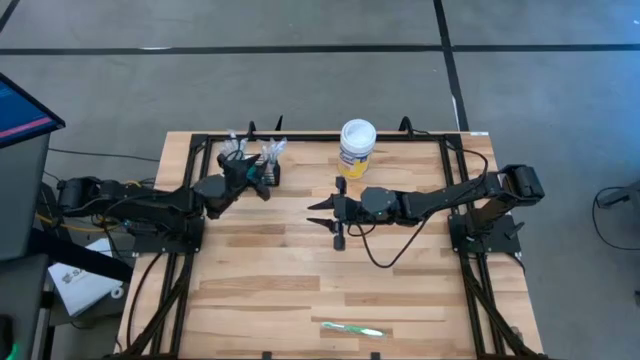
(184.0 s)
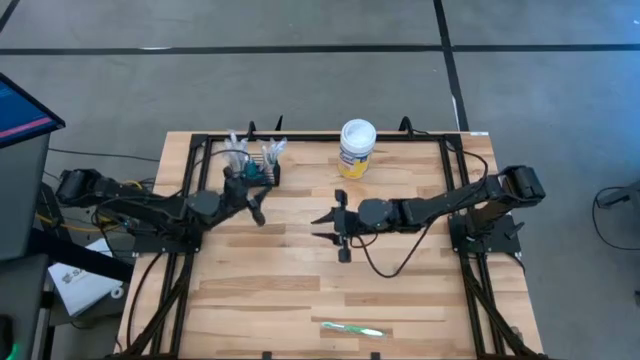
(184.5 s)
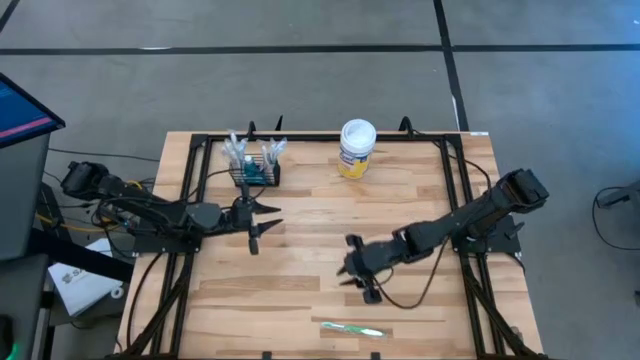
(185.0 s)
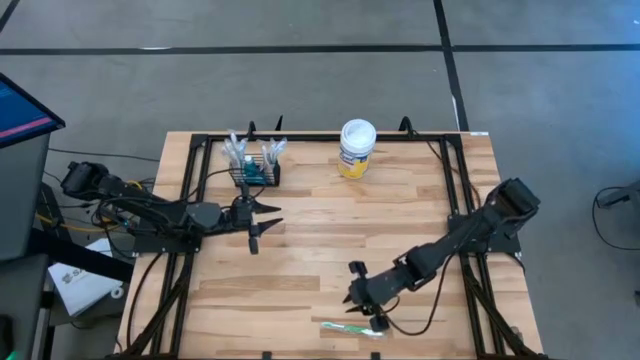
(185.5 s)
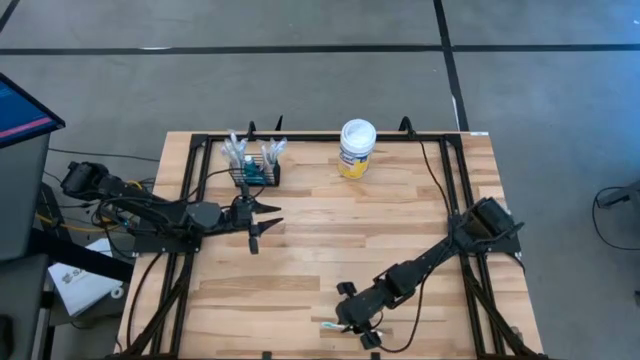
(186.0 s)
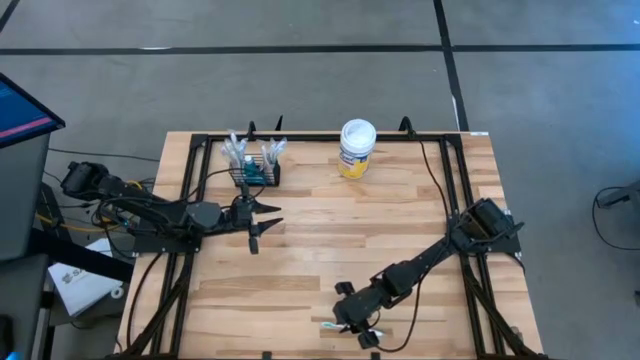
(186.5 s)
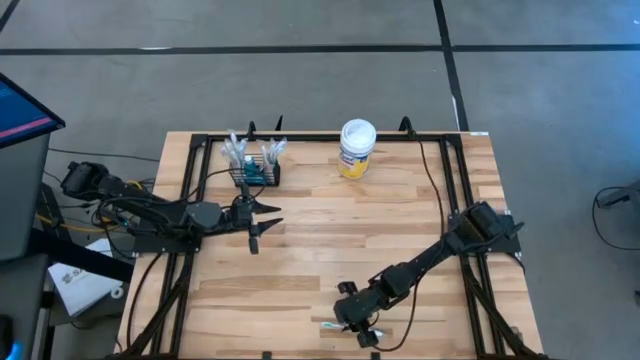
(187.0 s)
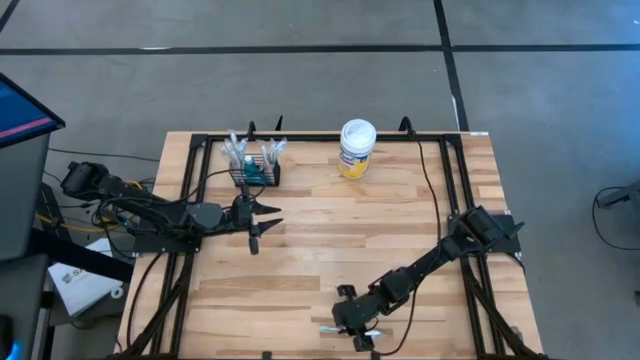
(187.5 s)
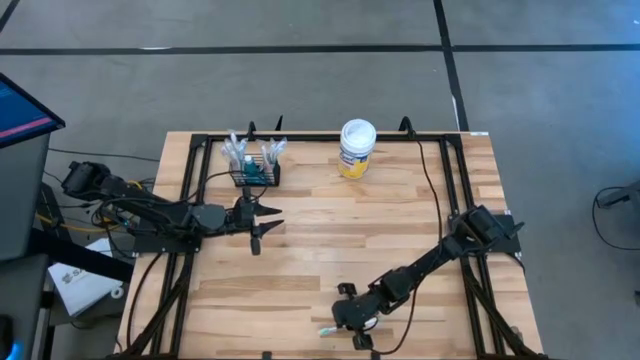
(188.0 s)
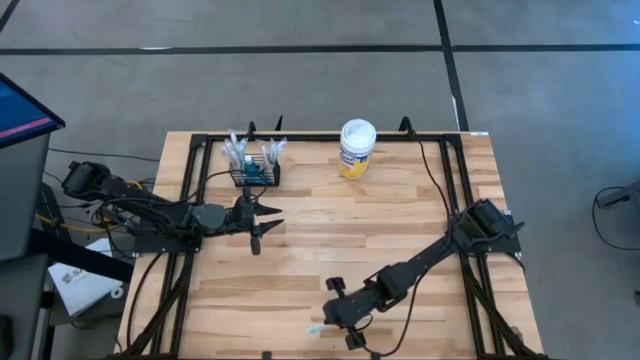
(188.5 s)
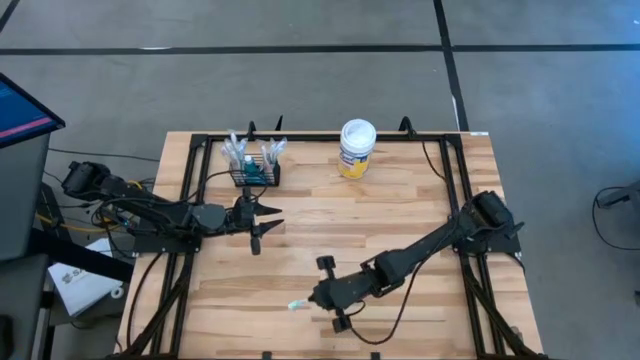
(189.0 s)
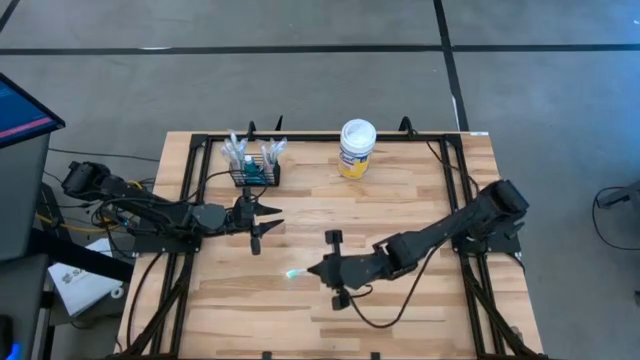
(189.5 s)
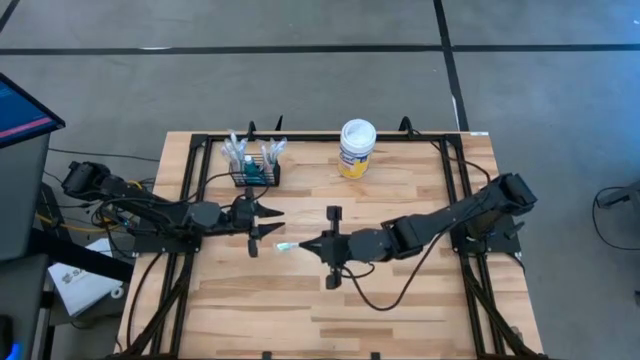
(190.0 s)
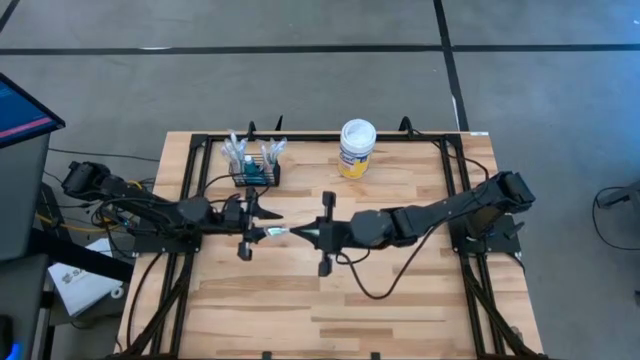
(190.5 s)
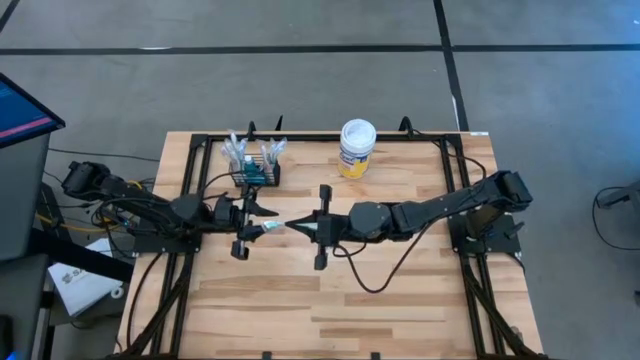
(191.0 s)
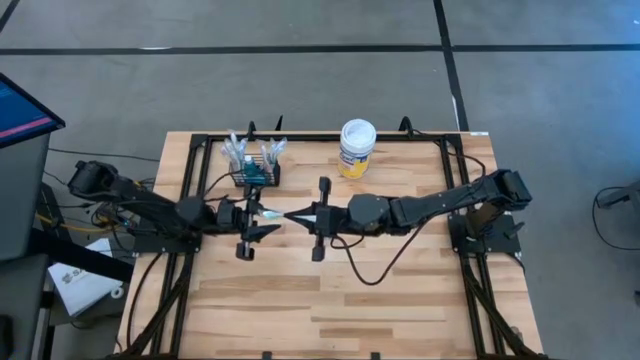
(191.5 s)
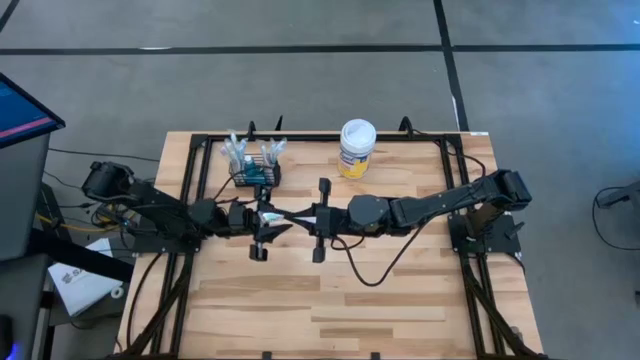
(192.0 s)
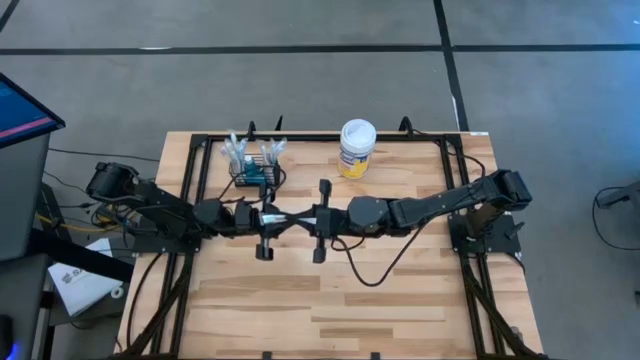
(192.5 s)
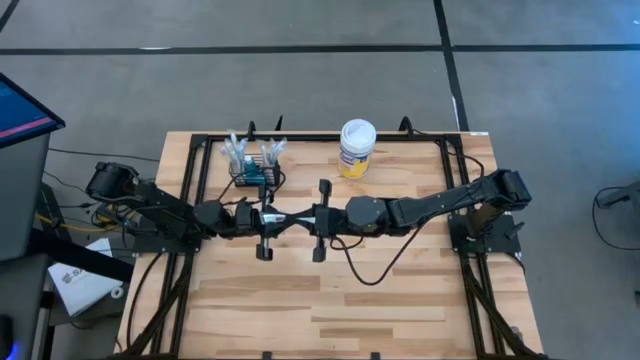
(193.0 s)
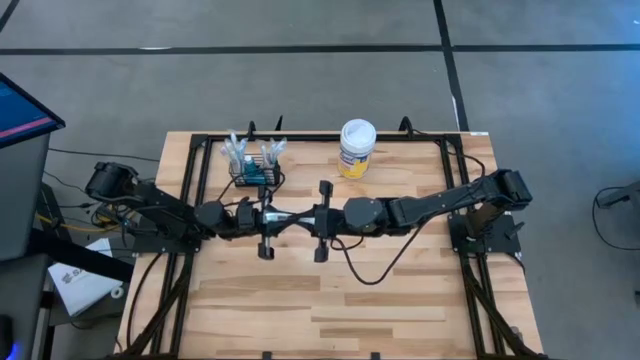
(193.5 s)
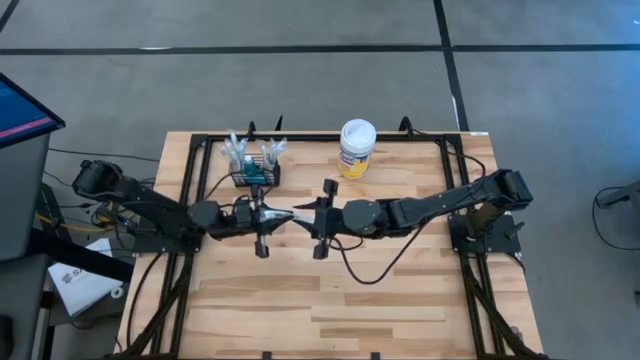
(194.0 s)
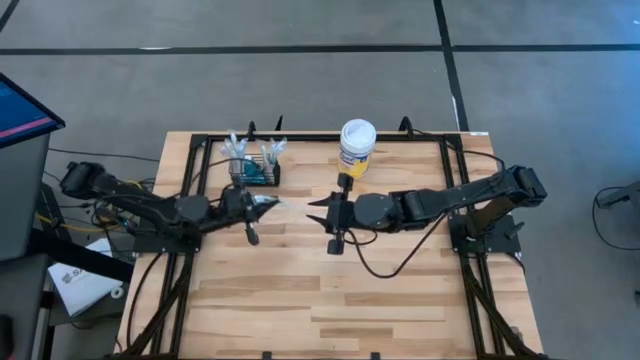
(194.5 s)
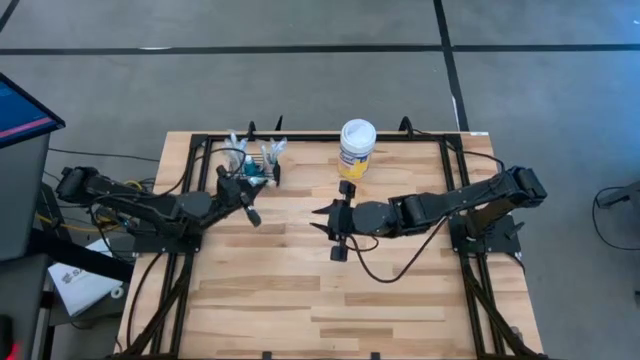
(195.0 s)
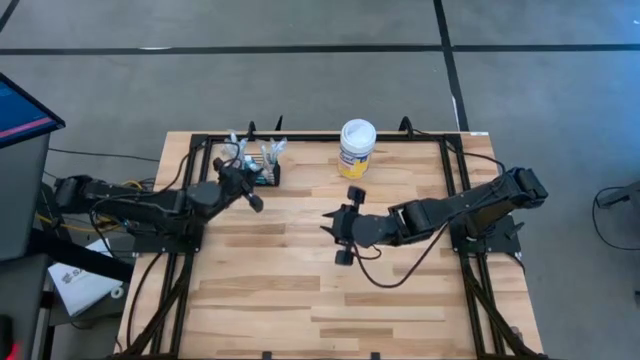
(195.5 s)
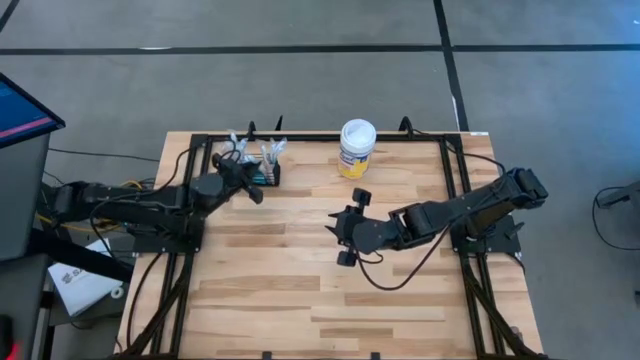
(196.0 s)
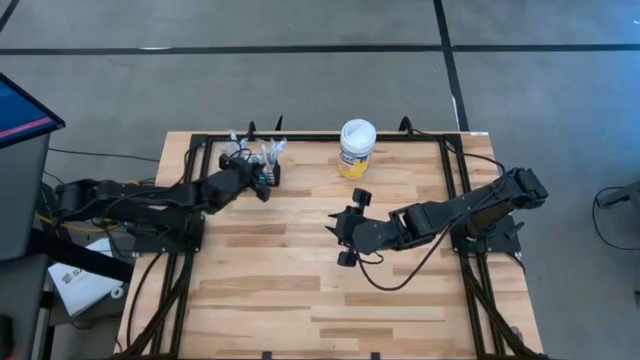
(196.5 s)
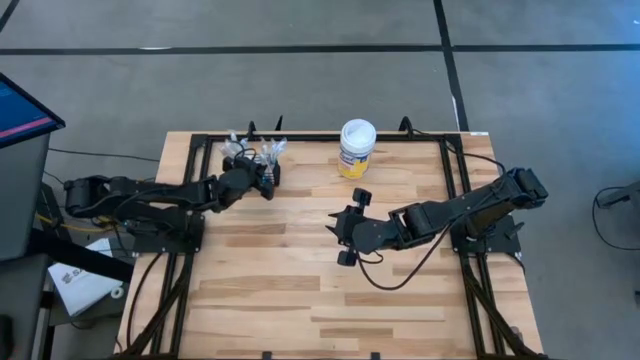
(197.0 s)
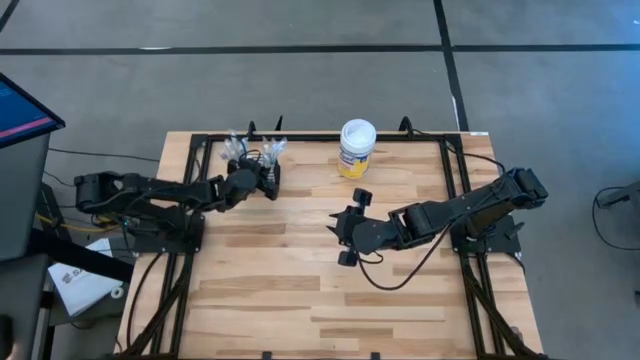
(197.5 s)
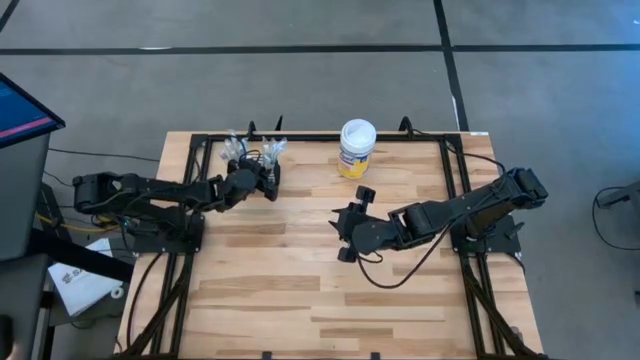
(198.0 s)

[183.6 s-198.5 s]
Task: Pick & Place toothbrushing station
Put the green toothbrush into the mesh organizer

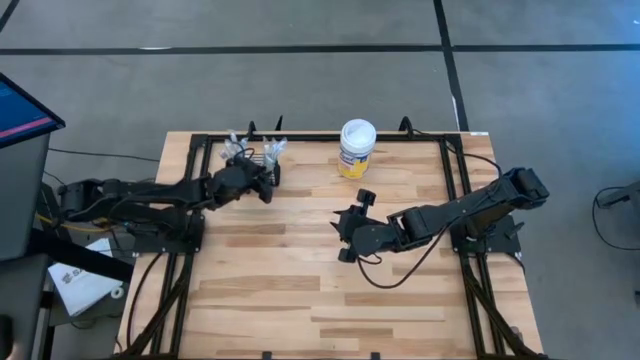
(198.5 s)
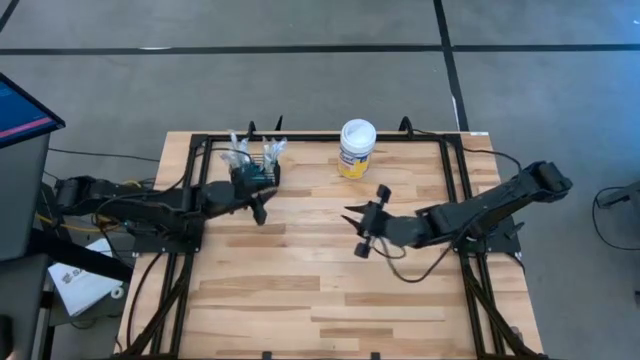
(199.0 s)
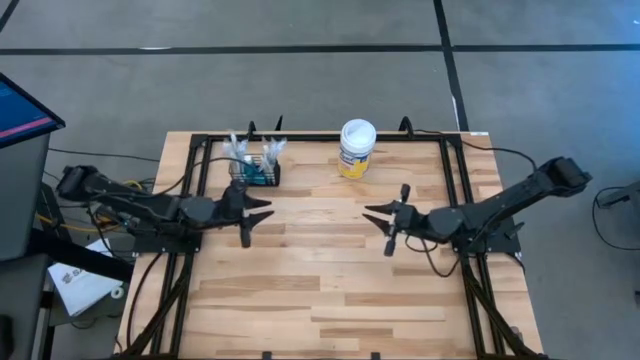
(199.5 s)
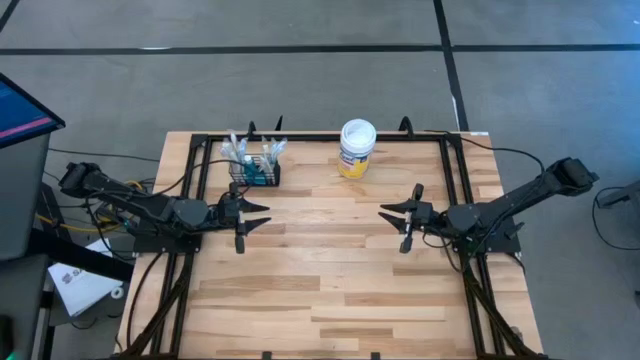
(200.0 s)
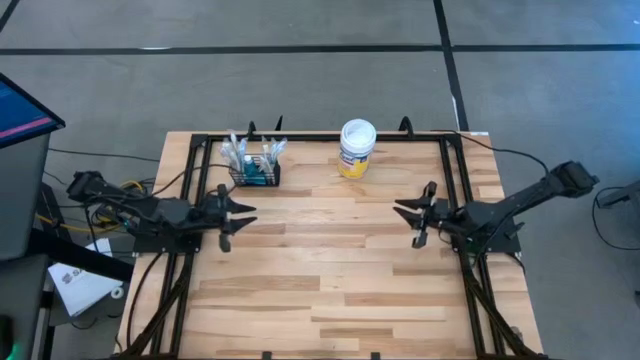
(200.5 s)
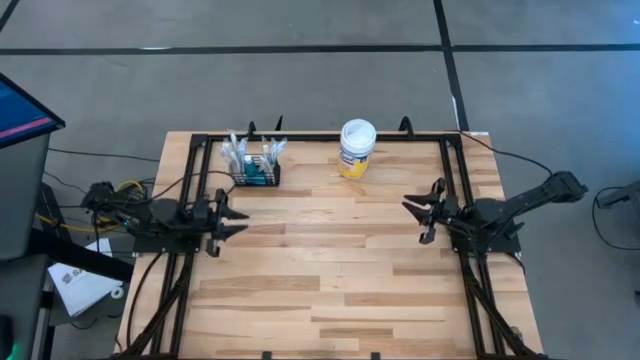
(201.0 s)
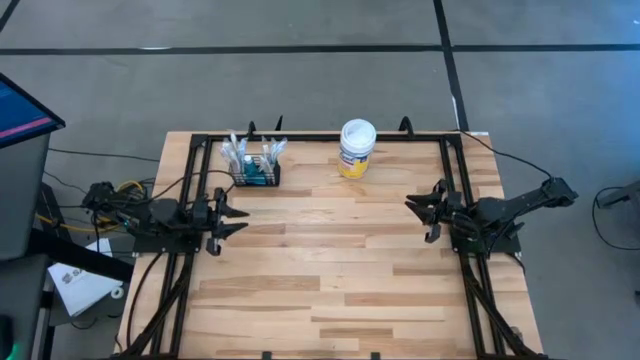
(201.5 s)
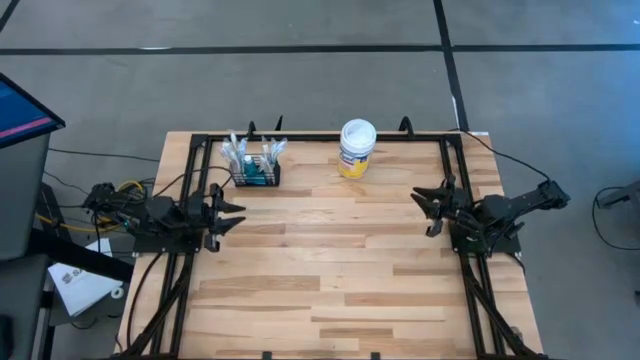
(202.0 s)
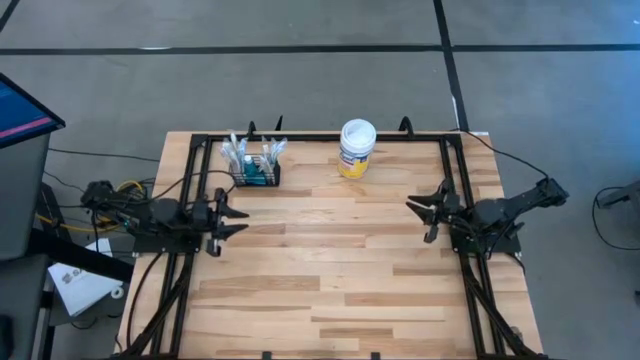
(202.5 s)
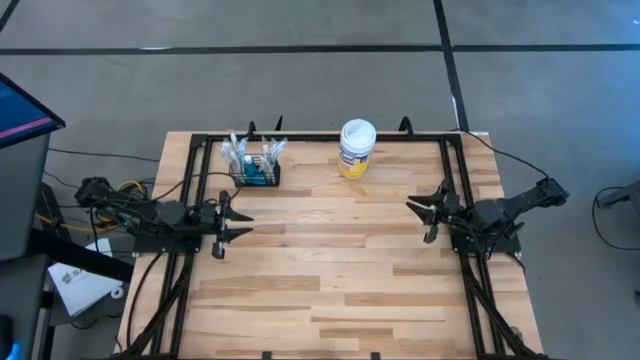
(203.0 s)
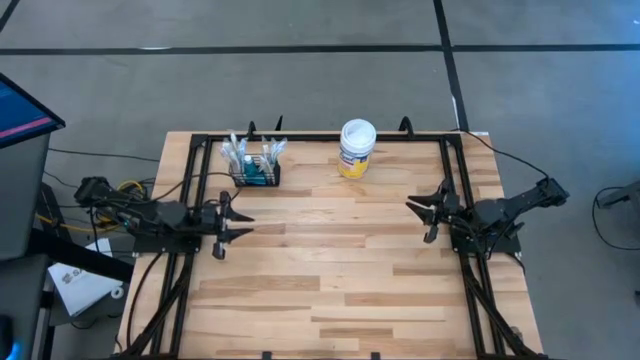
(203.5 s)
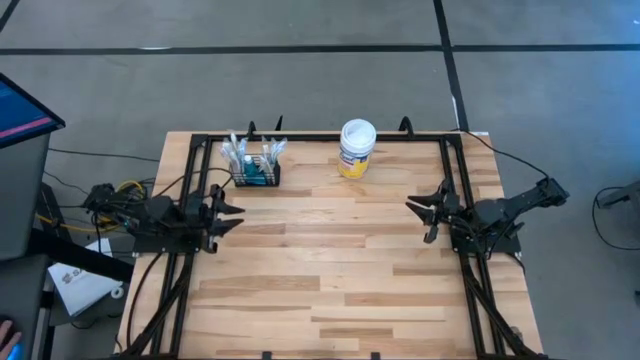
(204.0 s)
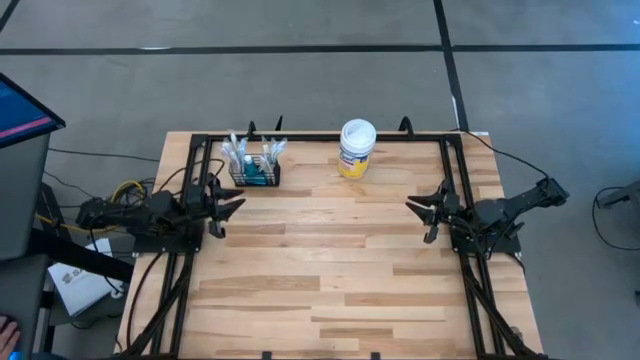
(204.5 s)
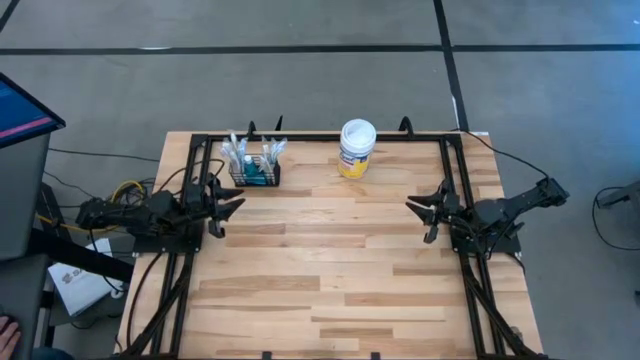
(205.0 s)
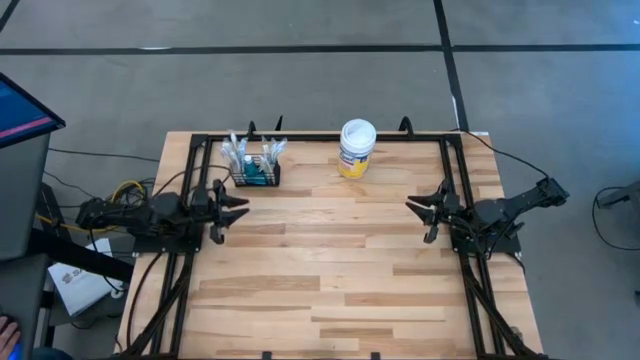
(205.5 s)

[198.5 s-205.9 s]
Return to Home Position
